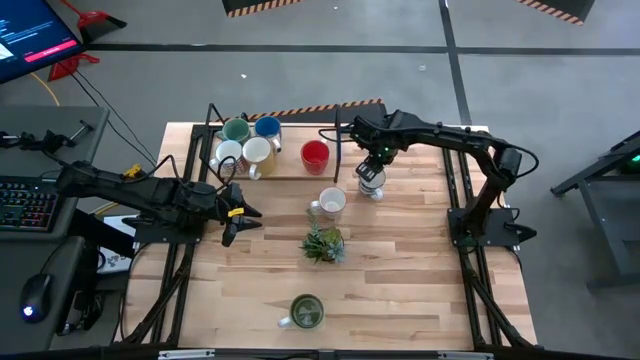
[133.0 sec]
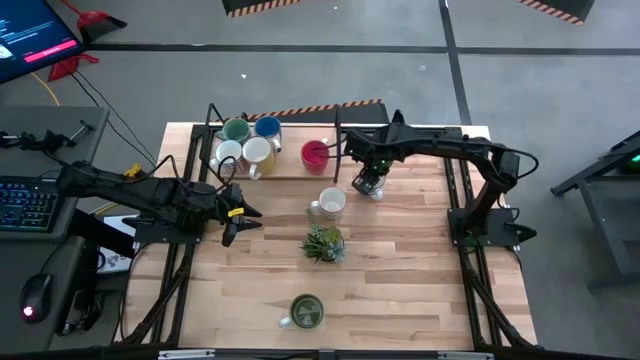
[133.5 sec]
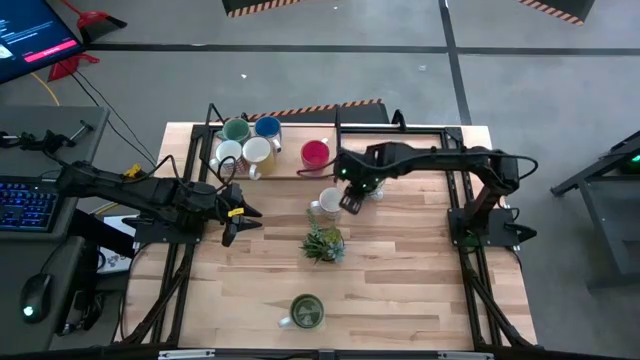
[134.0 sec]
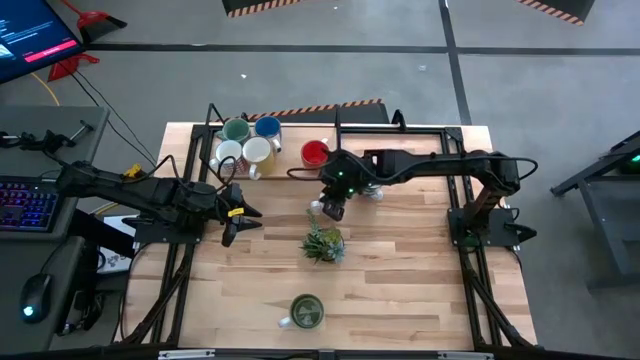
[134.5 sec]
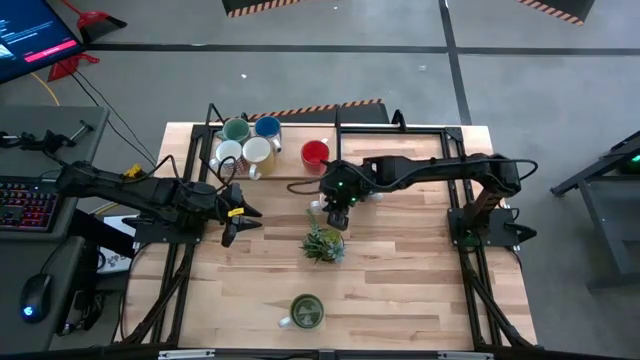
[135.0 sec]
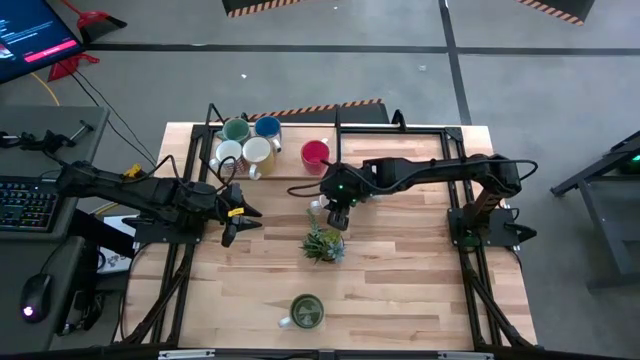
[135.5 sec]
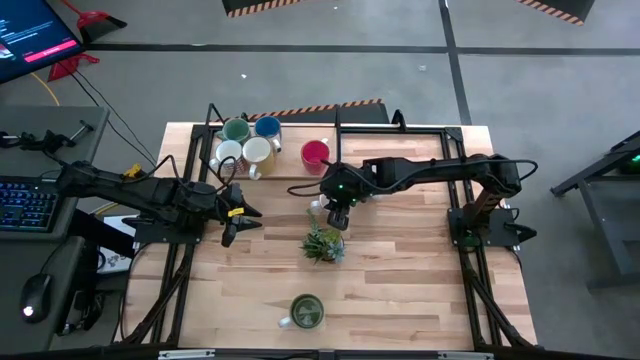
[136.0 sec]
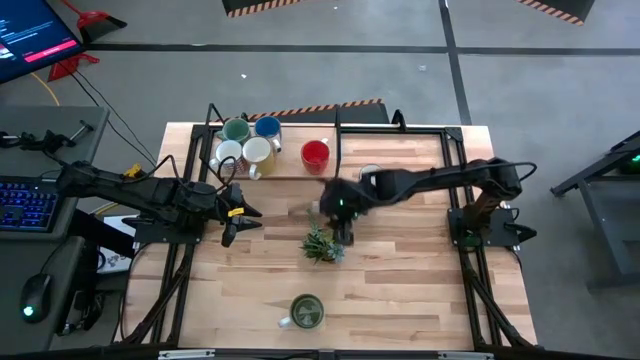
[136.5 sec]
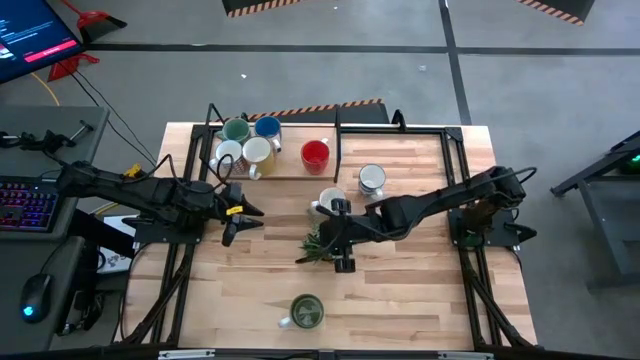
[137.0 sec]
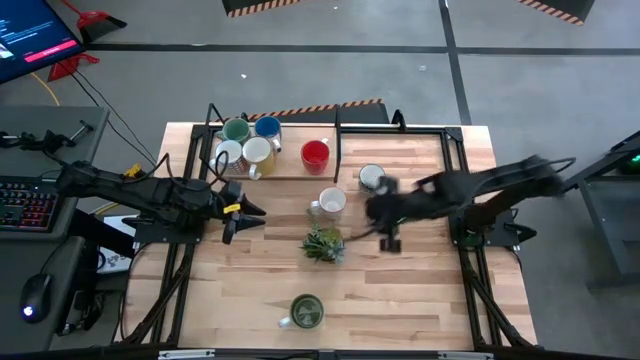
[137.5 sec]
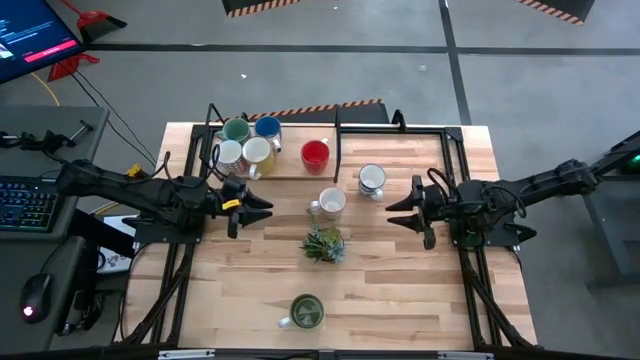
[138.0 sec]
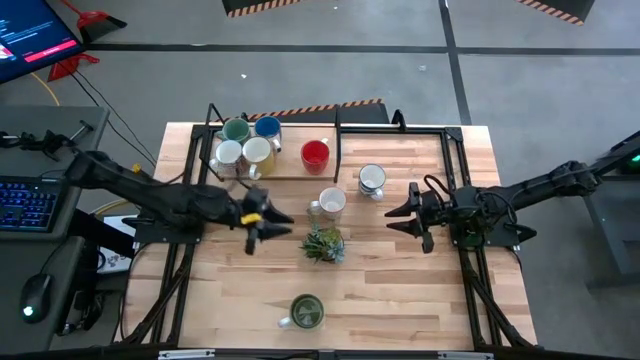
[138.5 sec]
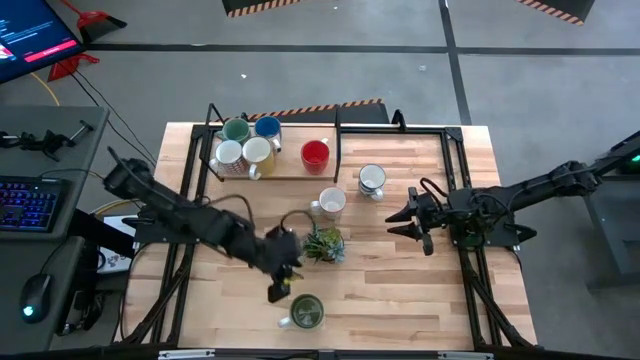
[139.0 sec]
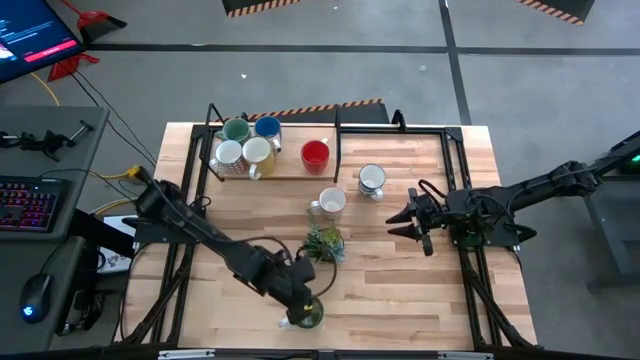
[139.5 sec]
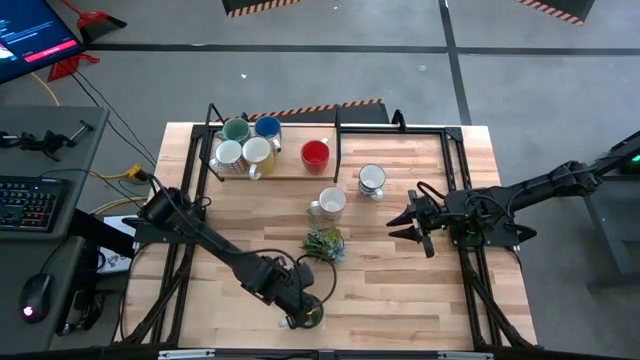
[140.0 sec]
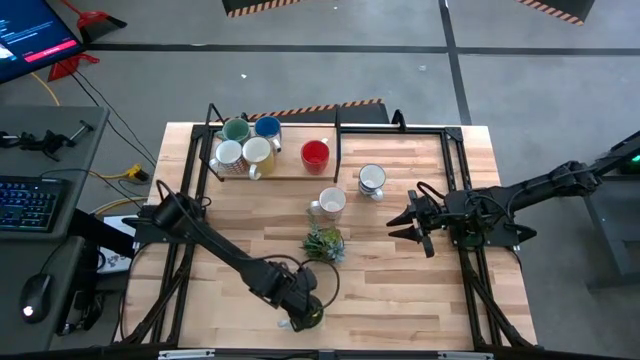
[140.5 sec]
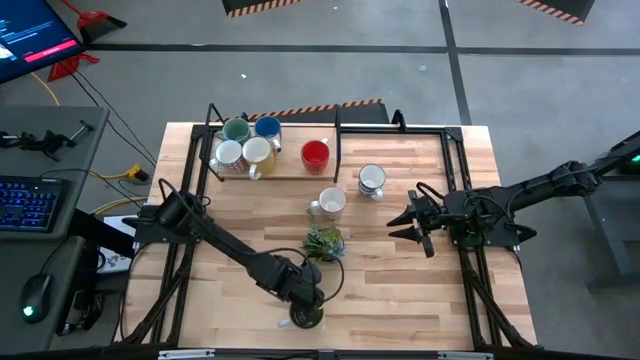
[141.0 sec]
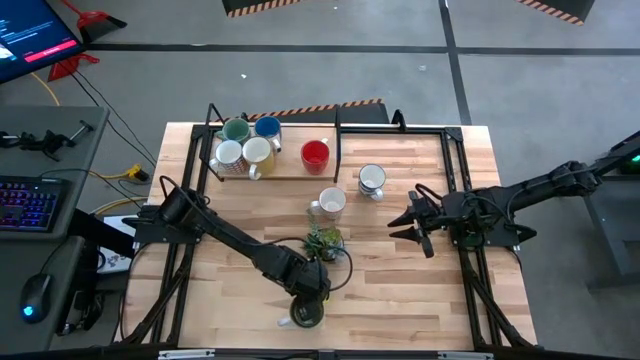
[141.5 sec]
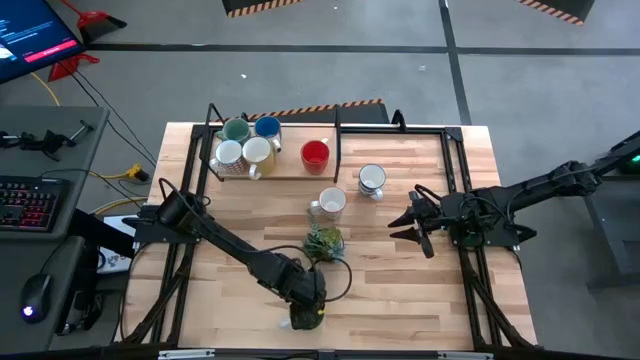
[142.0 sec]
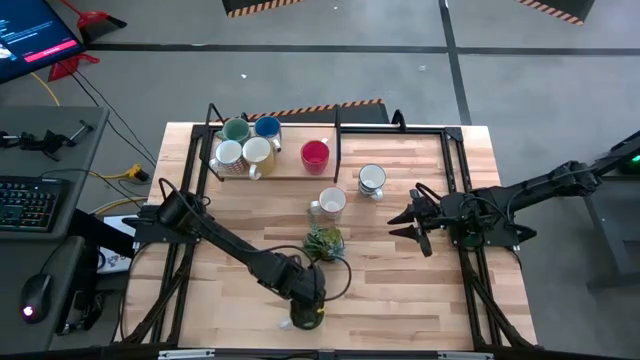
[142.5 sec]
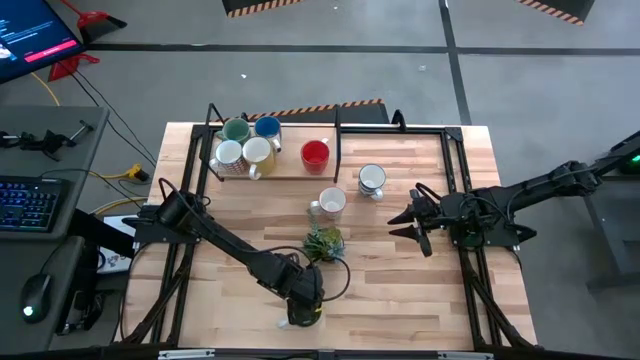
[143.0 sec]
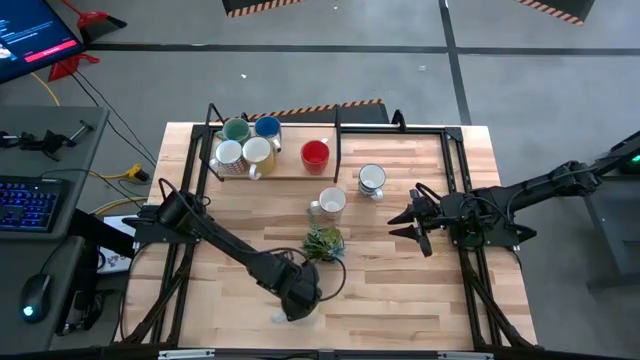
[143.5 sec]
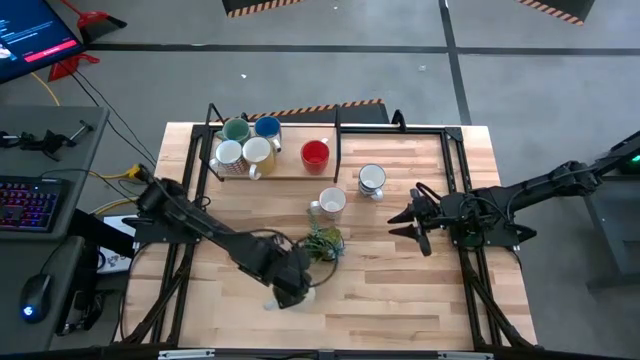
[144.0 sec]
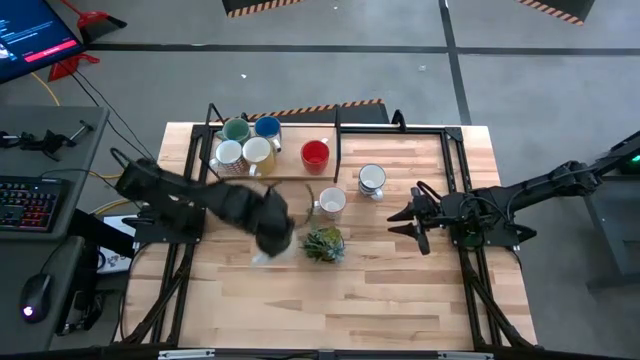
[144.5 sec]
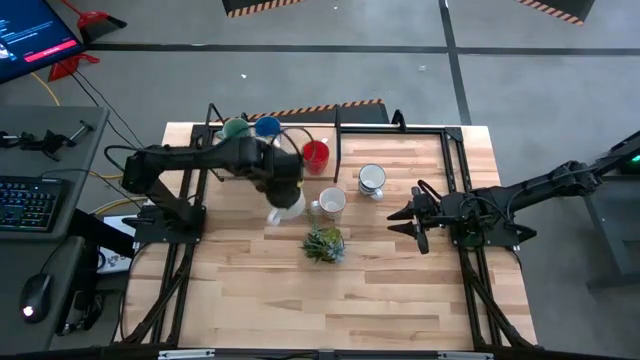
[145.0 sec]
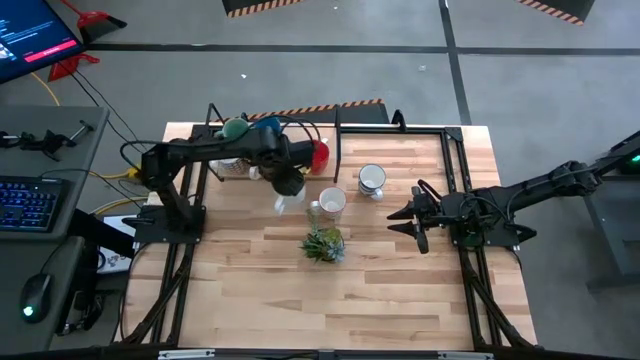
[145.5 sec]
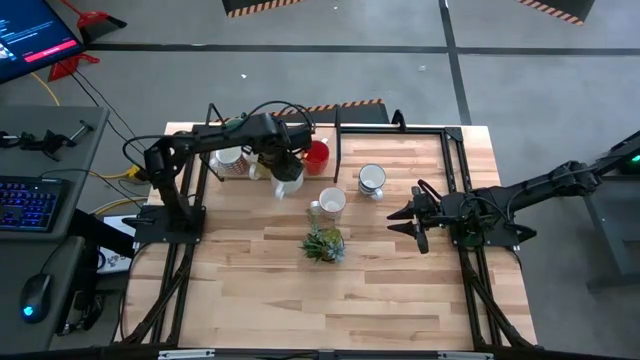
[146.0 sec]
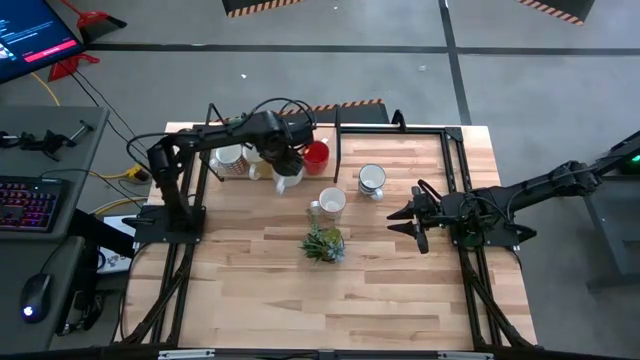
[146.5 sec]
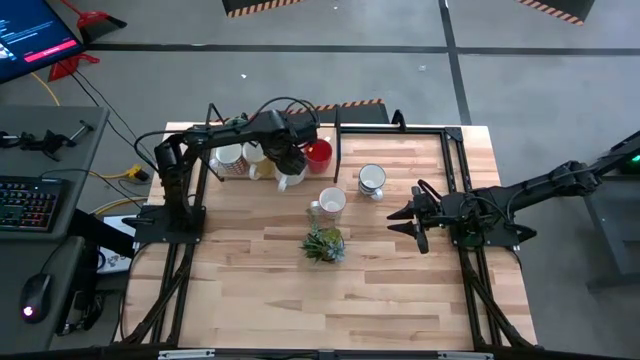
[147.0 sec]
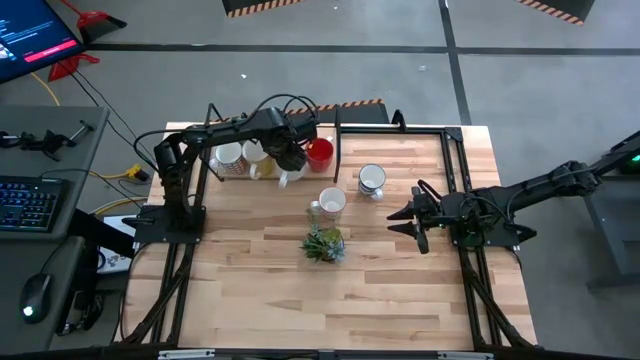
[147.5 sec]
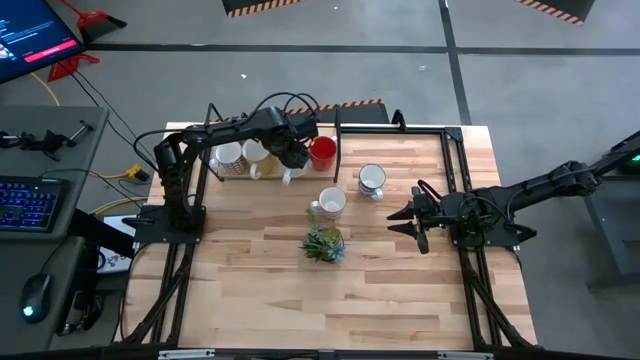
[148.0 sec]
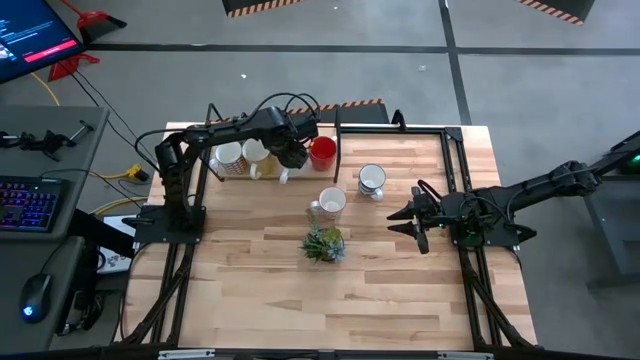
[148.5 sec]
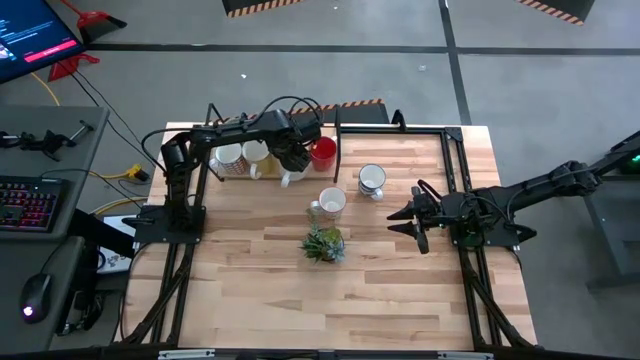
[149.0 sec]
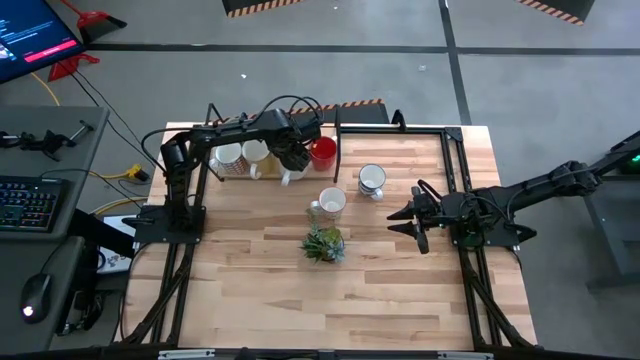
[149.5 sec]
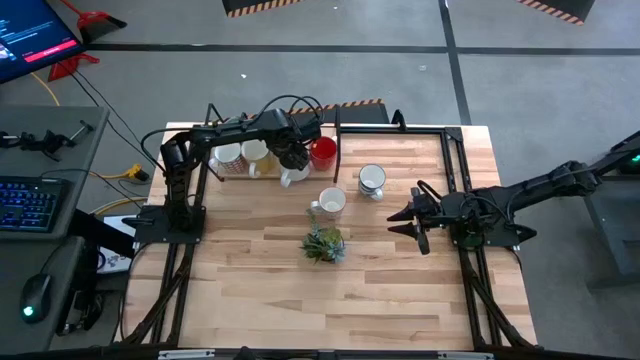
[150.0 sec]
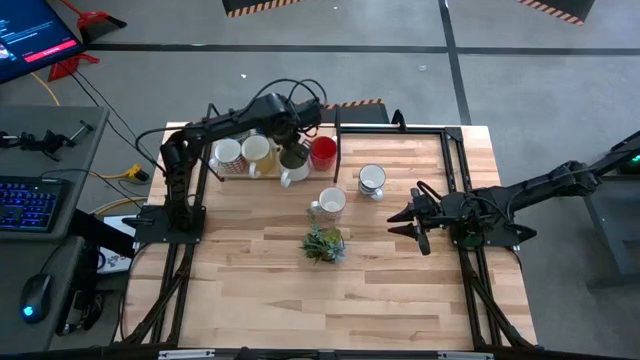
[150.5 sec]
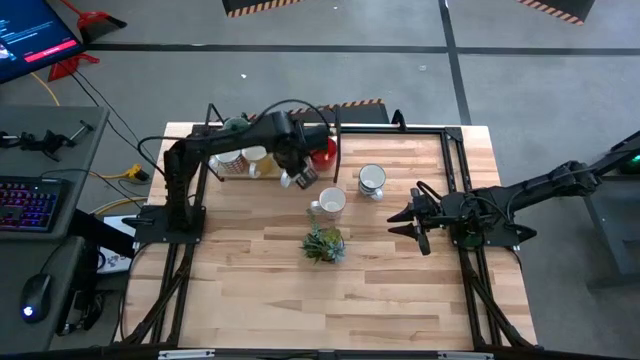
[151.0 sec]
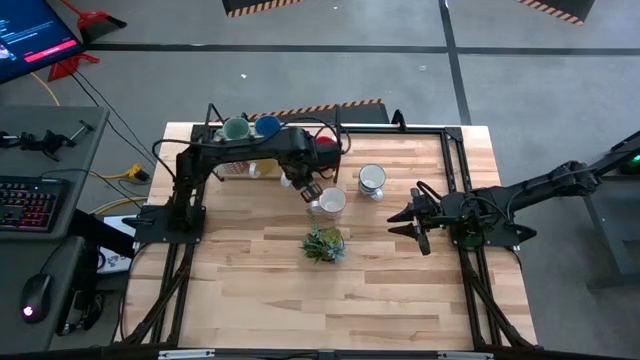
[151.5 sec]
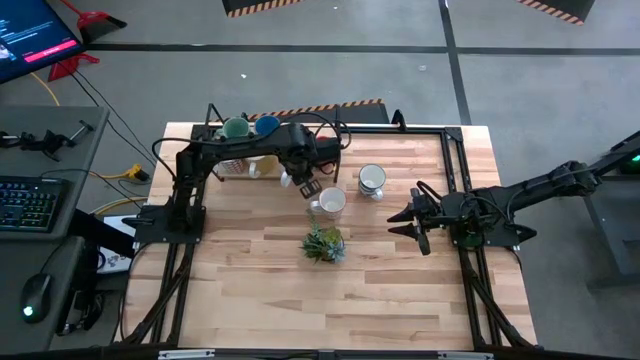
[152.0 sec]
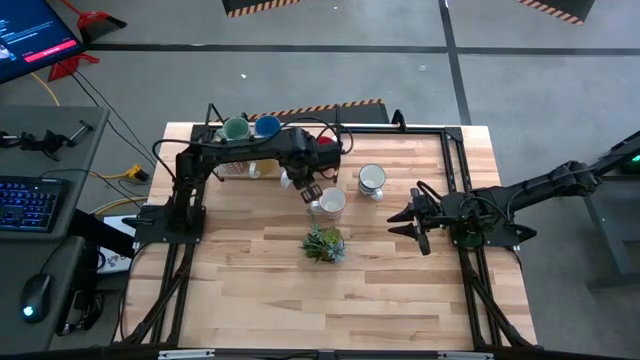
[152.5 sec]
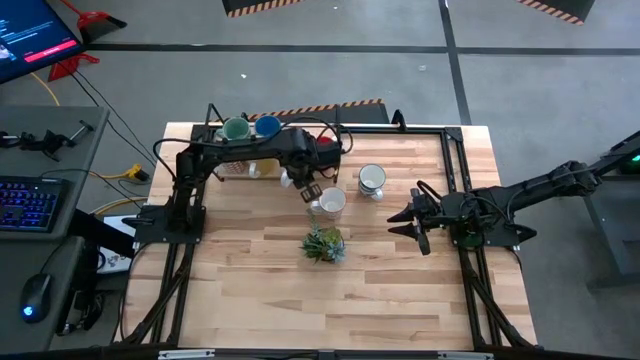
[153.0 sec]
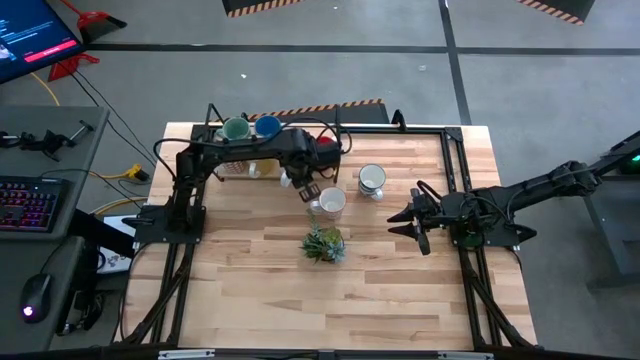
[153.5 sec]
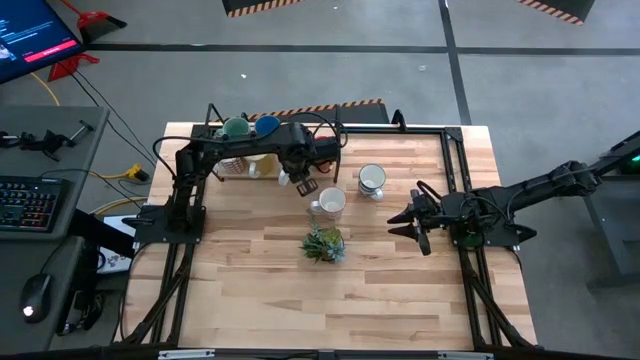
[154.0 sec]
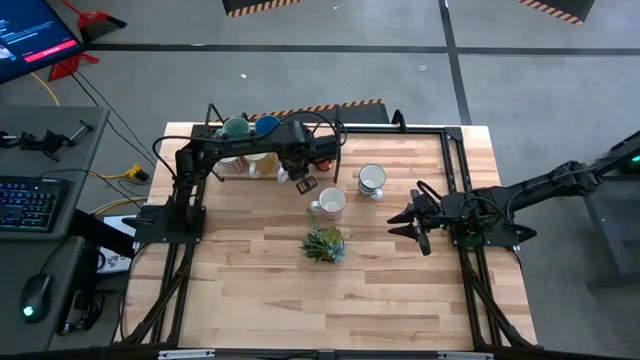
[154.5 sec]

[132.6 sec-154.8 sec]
Task: Place coffee mugs
Put the white green mug on the shelf

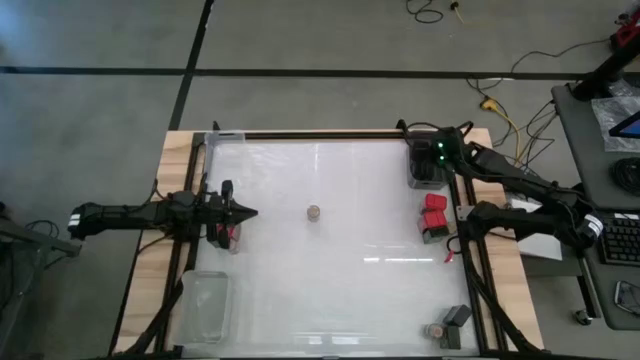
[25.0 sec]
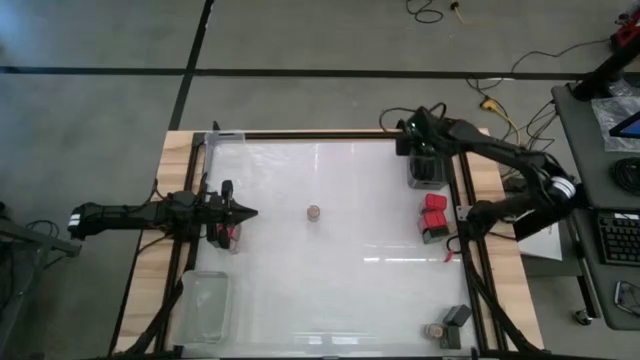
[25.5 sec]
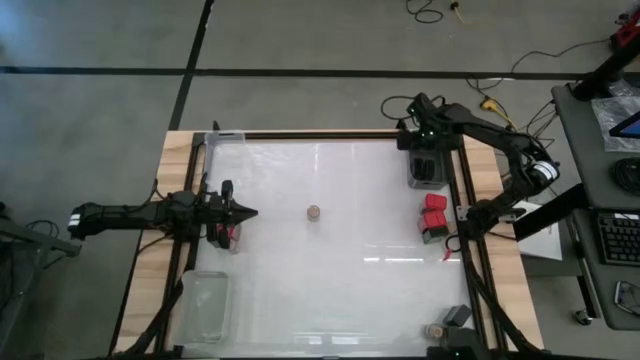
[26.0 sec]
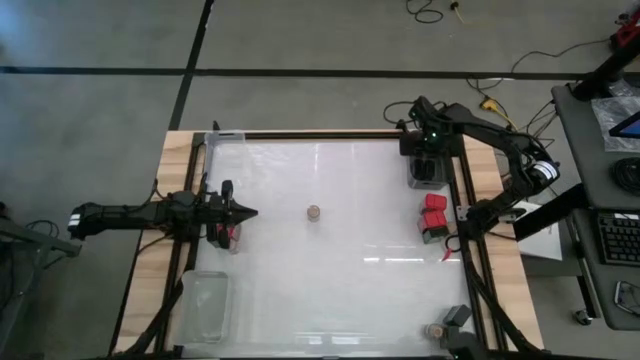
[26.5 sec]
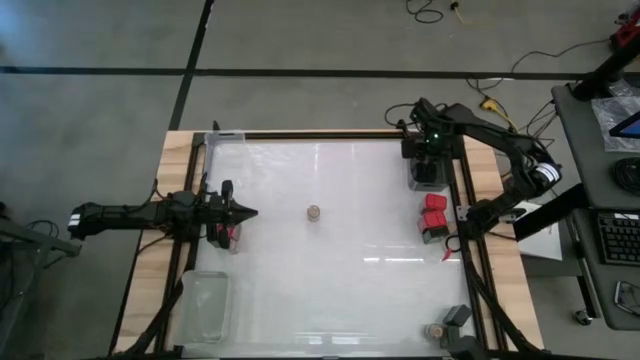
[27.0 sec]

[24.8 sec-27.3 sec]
Task: Sort spices by type
Adjust the black seasoning cans in the black bin
